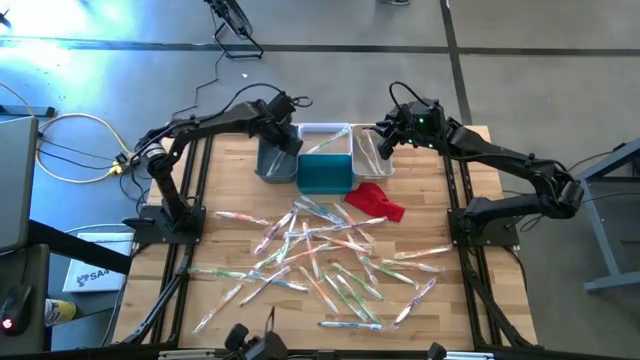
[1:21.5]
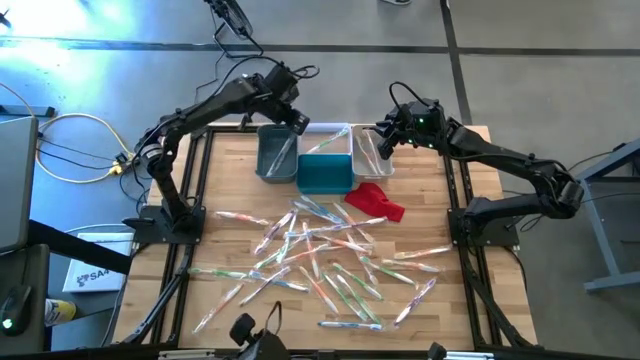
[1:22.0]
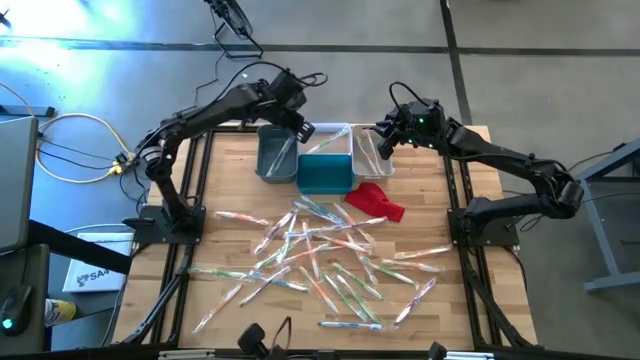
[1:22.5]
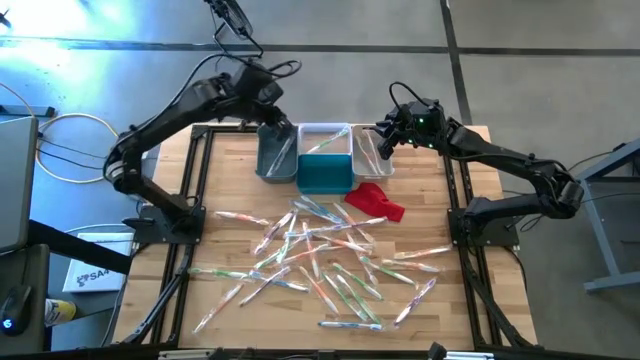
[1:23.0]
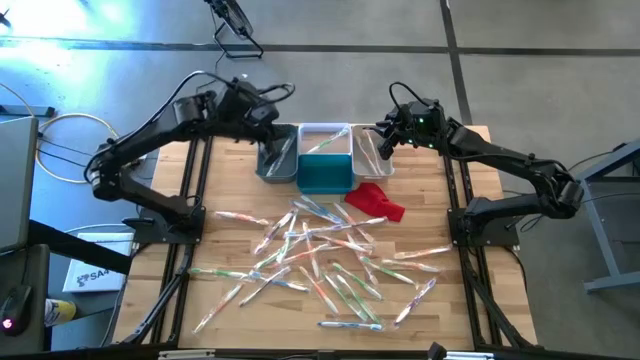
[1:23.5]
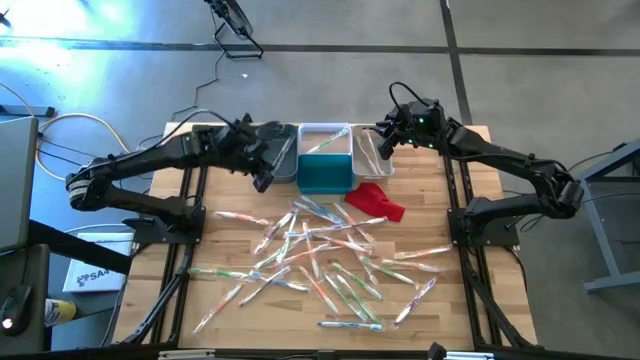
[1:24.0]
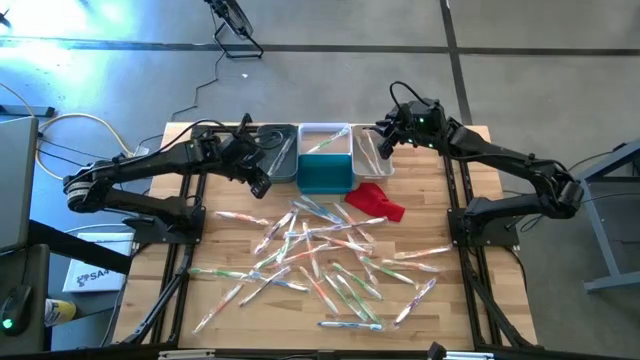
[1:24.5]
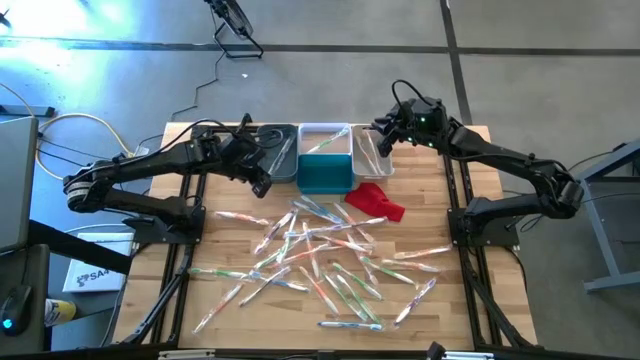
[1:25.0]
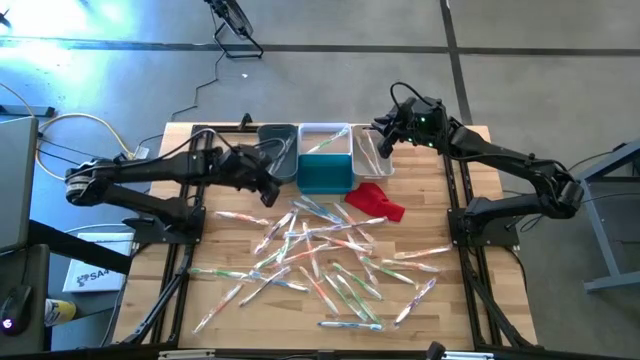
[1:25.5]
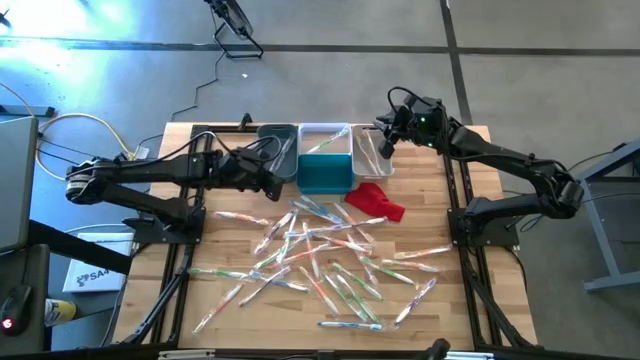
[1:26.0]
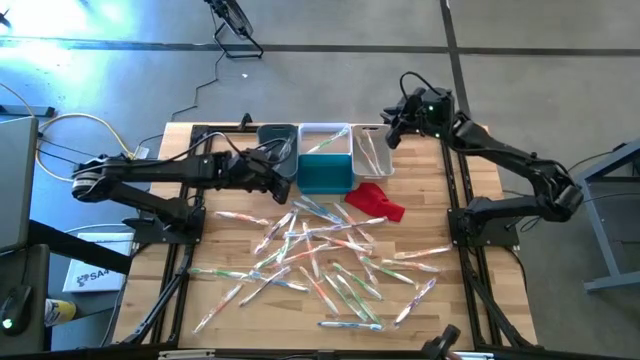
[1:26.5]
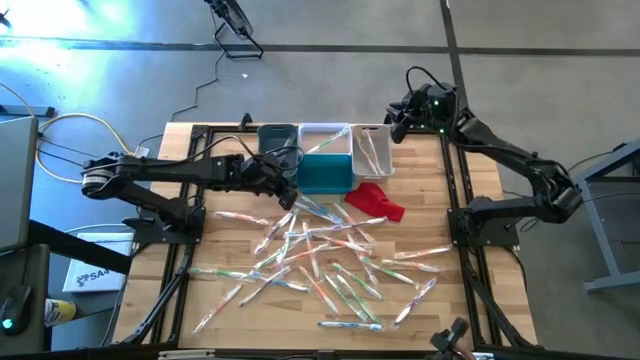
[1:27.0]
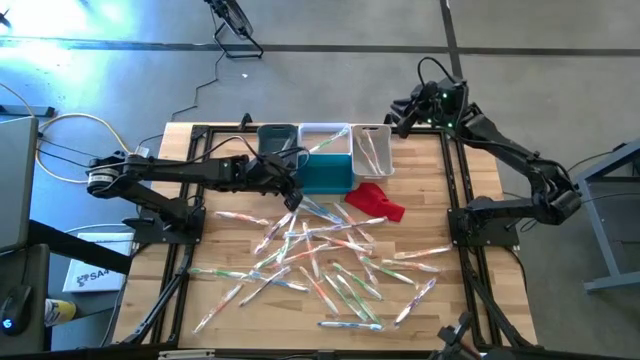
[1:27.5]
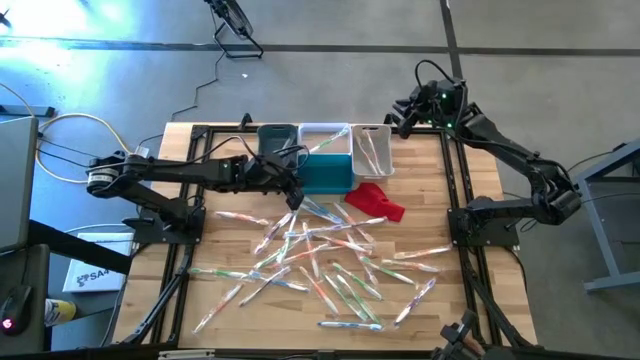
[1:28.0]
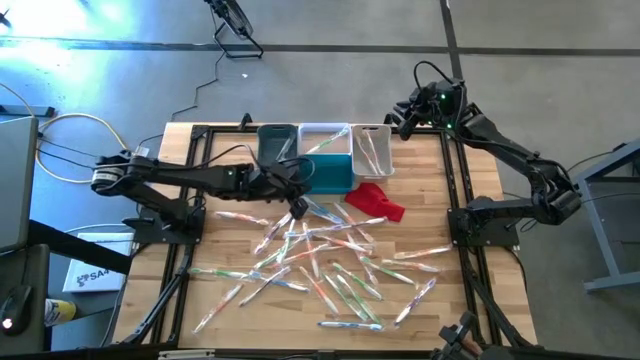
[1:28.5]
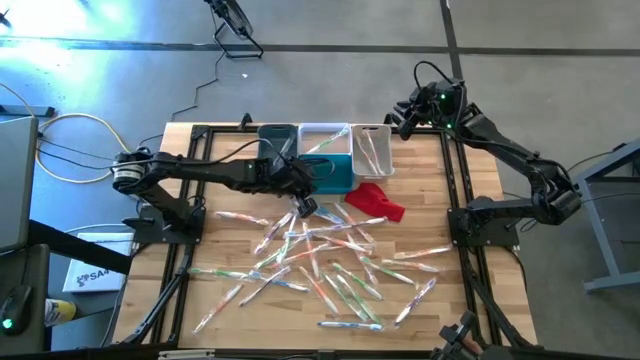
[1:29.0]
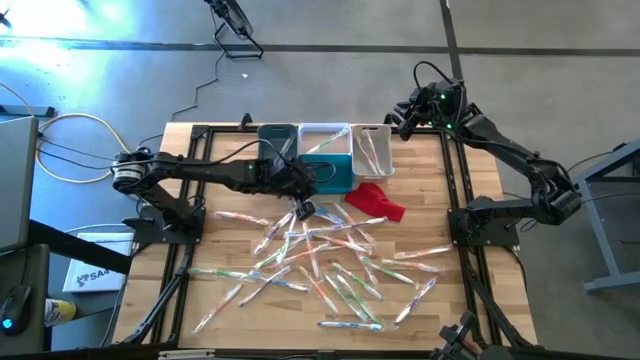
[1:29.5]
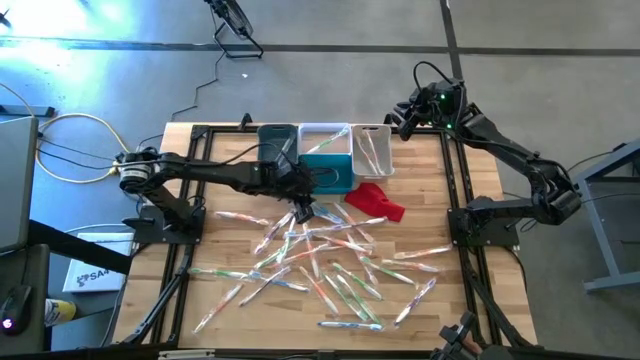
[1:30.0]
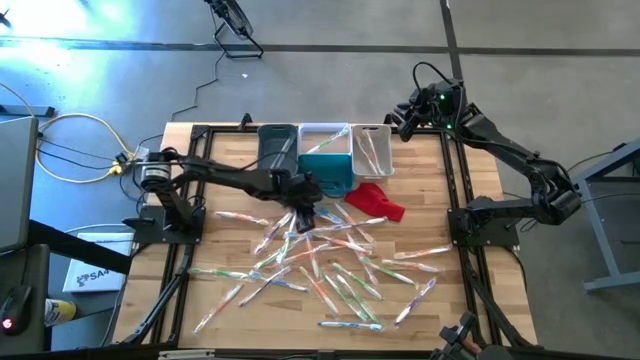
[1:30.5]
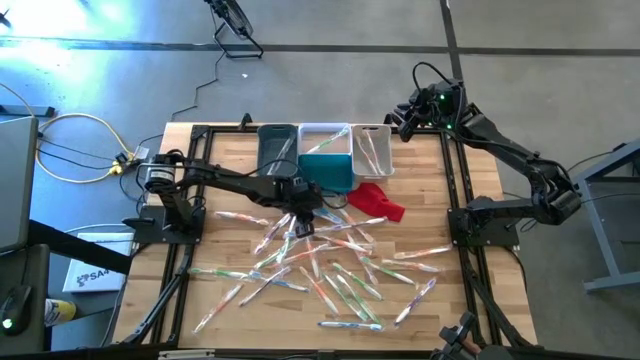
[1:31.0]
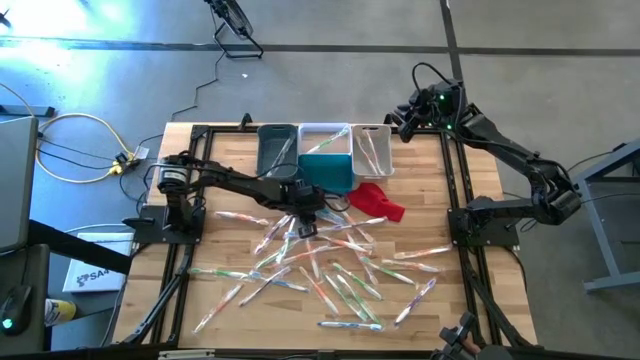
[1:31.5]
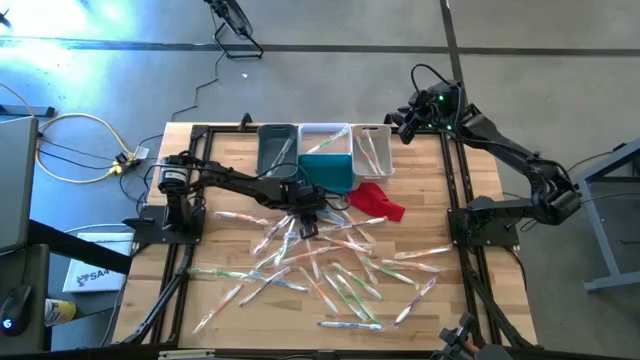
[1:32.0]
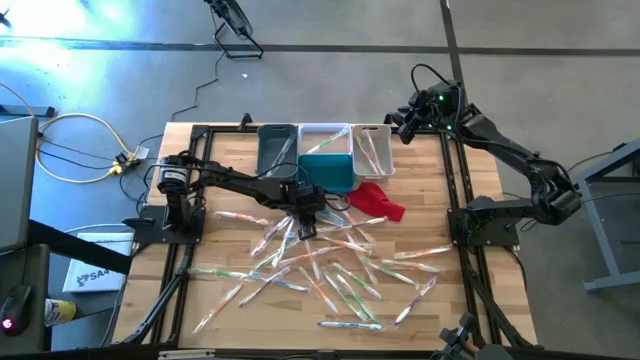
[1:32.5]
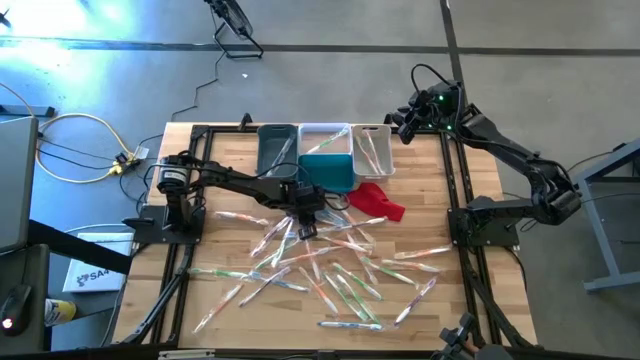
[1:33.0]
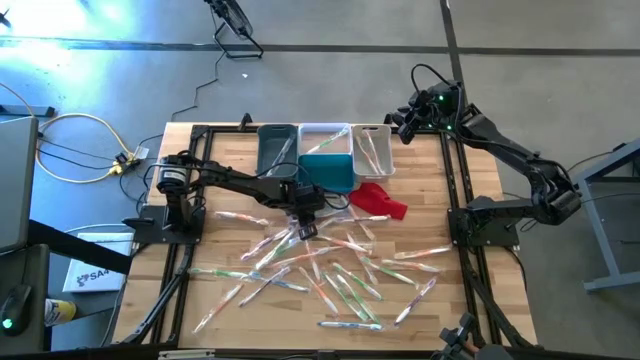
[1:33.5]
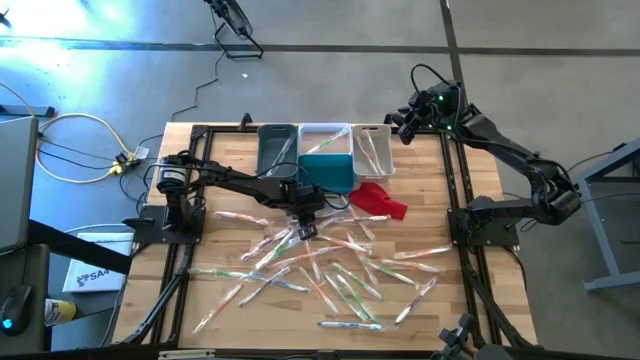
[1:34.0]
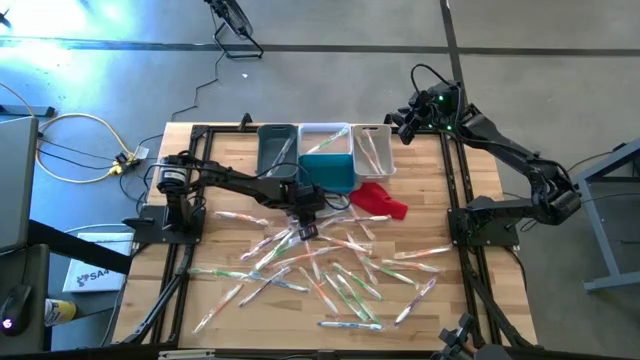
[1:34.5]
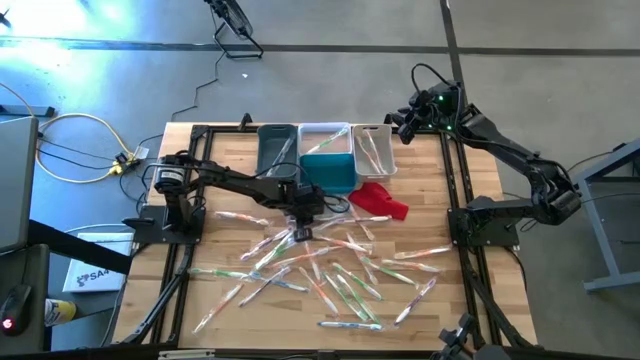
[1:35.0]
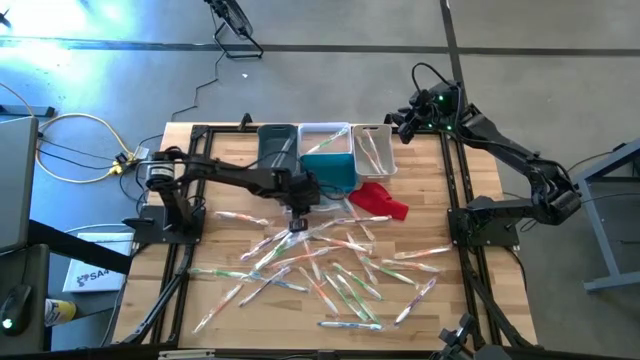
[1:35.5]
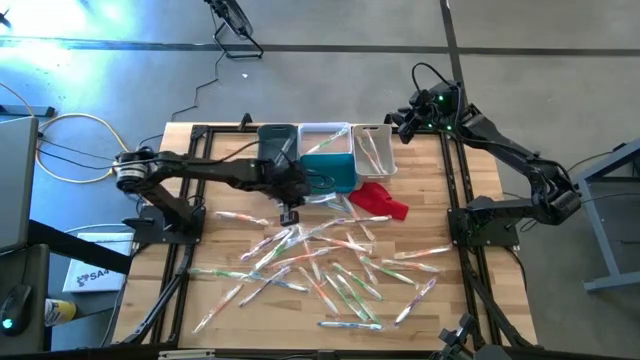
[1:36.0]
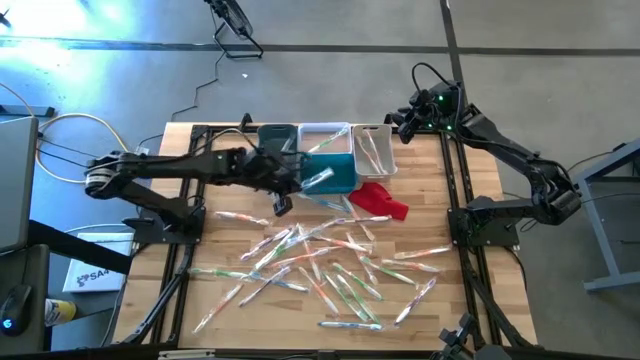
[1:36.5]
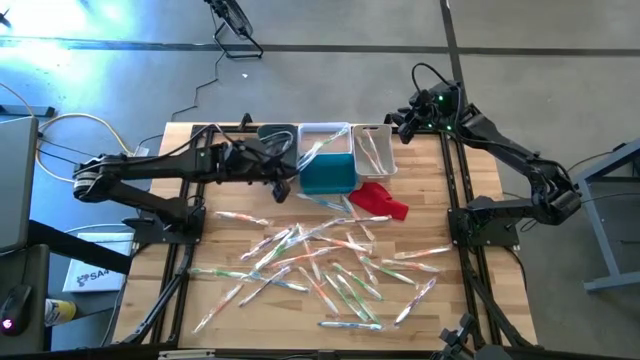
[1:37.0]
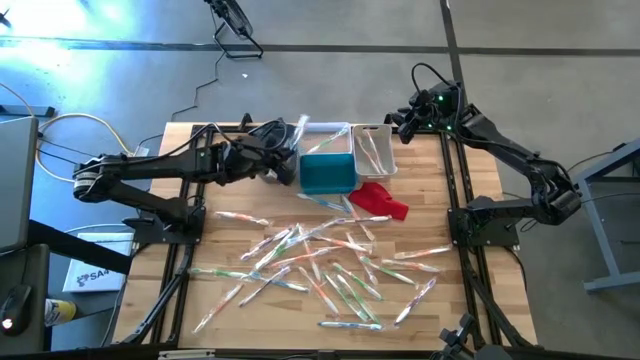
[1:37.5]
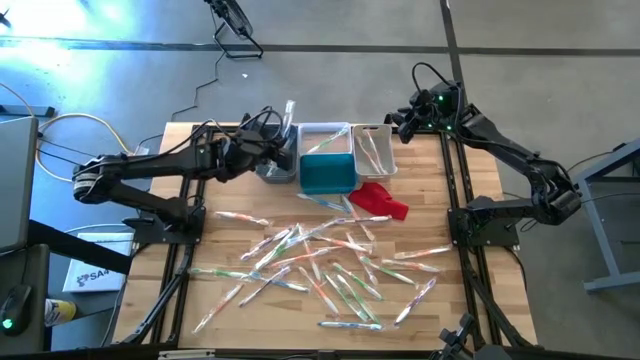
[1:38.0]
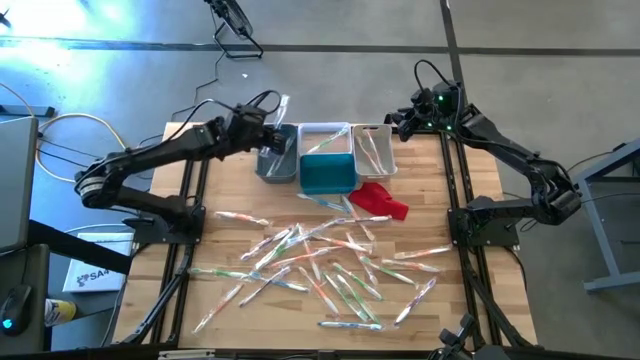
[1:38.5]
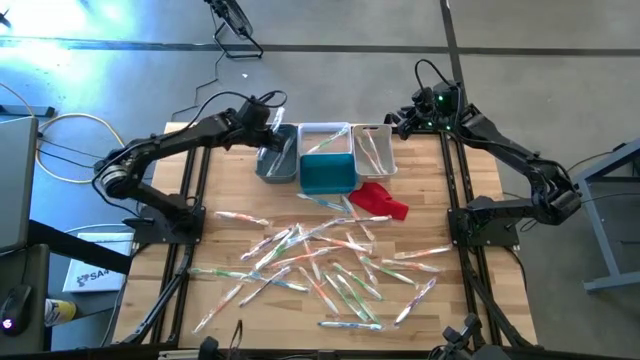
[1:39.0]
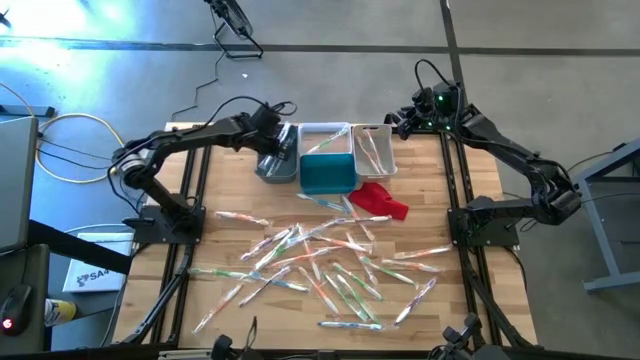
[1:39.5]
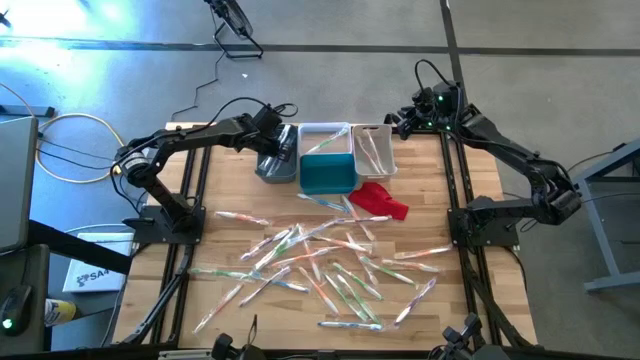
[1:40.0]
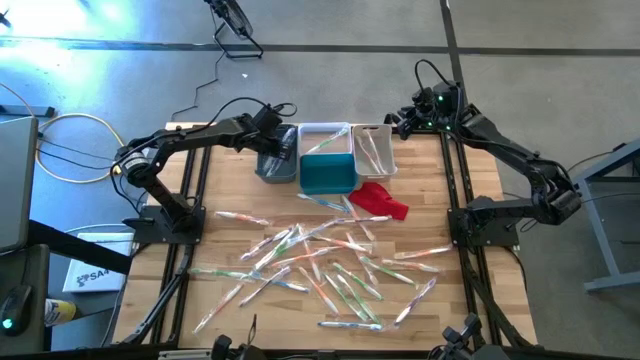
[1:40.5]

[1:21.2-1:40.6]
Task: Pick & Place Toothbrushes
Put the blue toothbrush into the gray bin

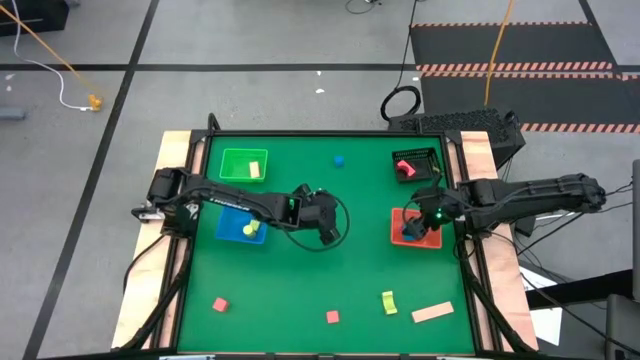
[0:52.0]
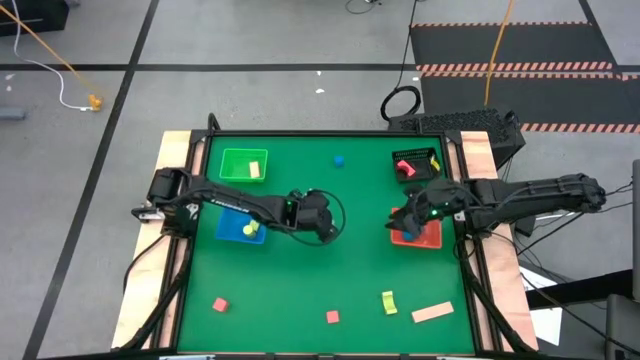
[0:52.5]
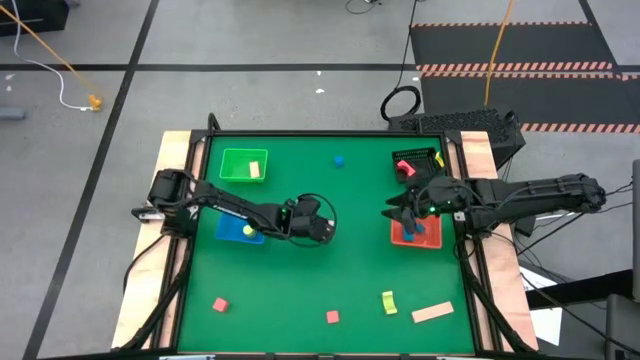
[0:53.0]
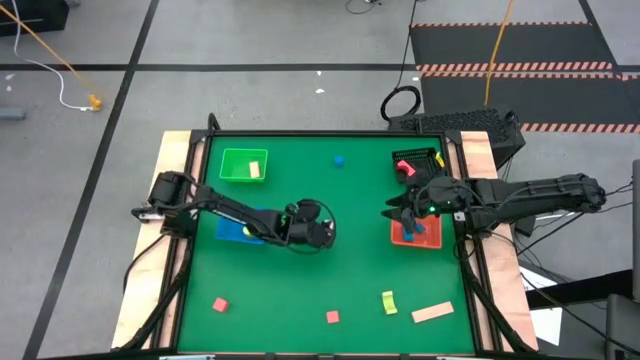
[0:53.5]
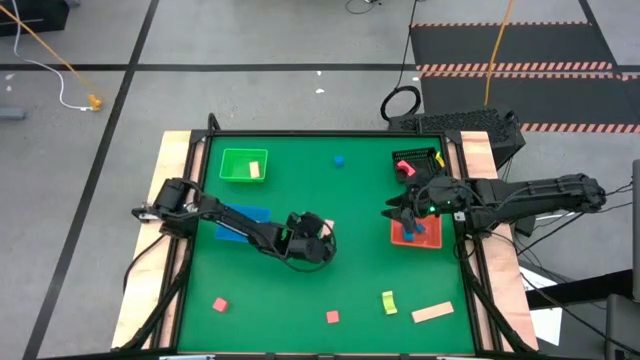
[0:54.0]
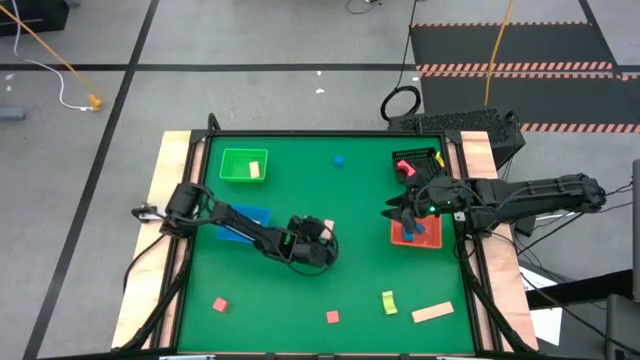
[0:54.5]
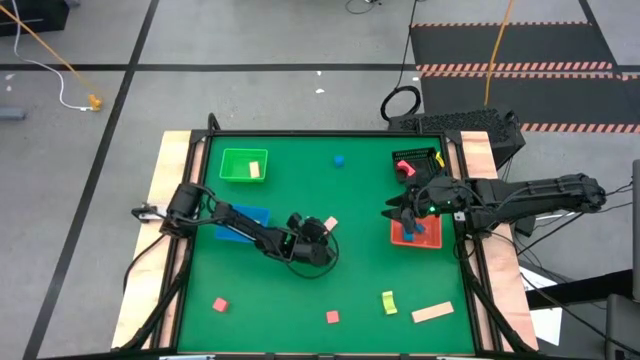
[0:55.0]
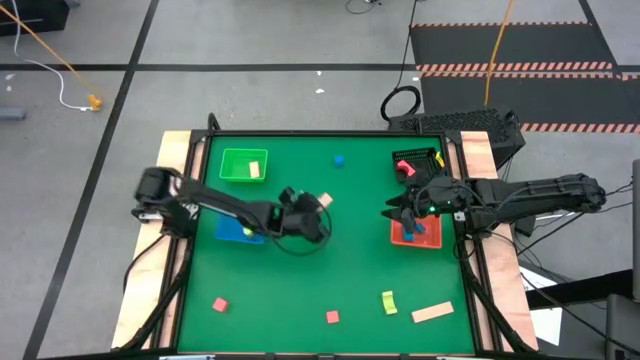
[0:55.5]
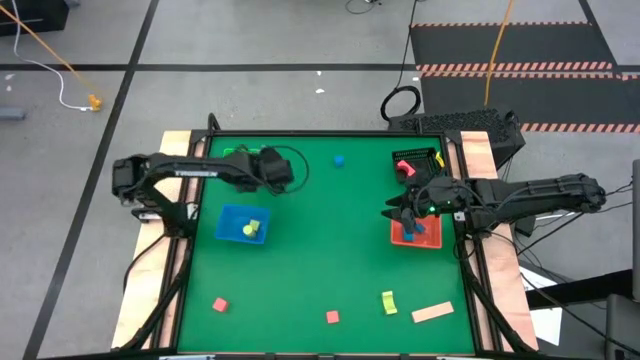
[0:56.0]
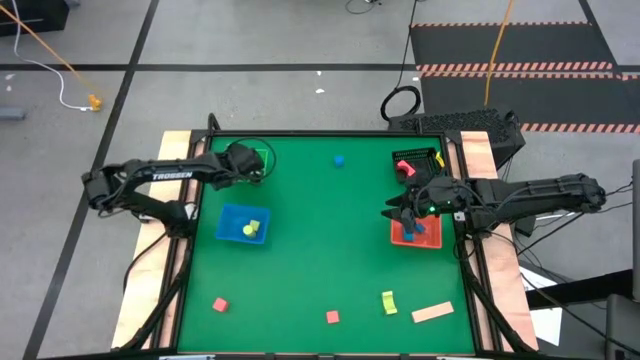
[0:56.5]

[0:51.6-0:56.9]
Task: Sort & place blocks by color
Put the top brown block into the green bin
